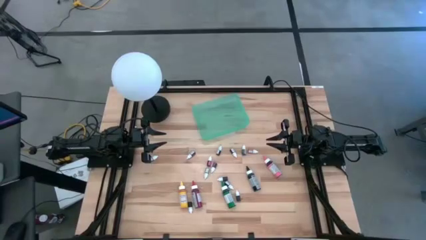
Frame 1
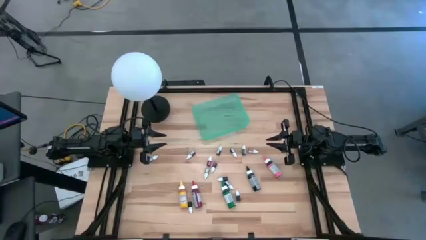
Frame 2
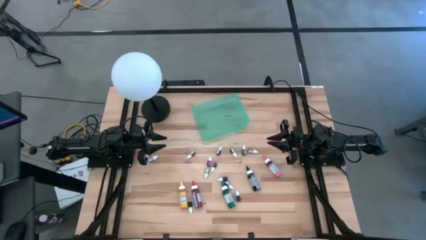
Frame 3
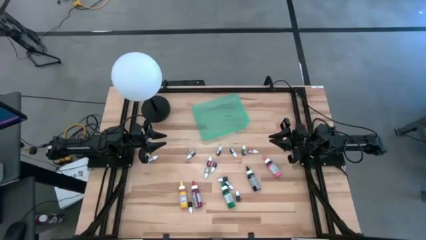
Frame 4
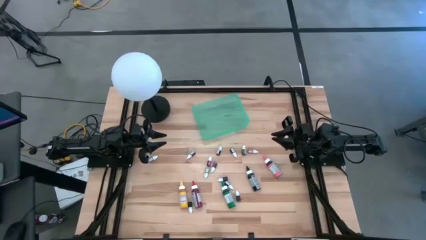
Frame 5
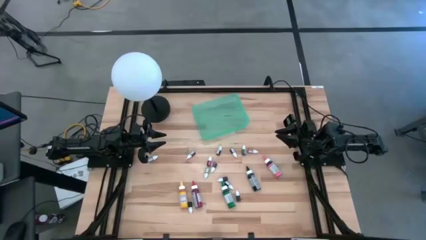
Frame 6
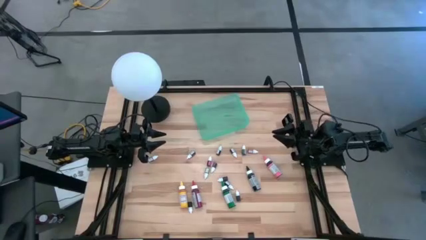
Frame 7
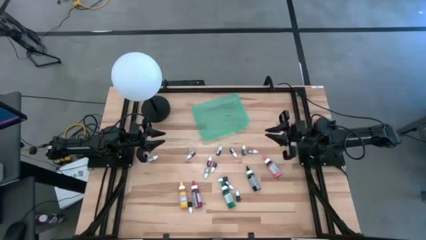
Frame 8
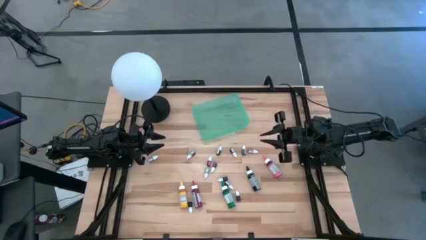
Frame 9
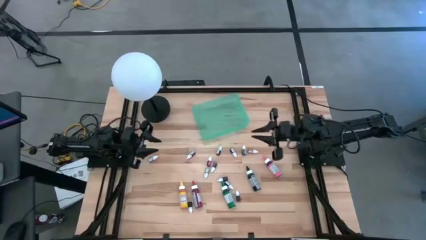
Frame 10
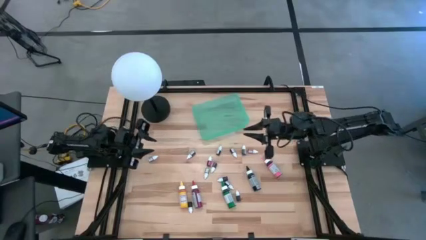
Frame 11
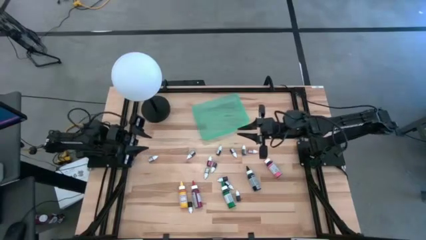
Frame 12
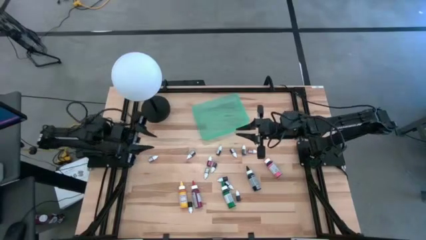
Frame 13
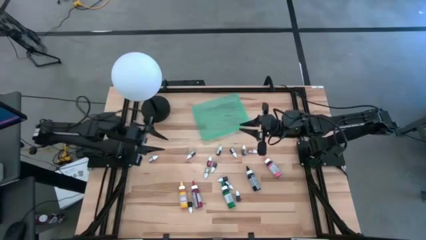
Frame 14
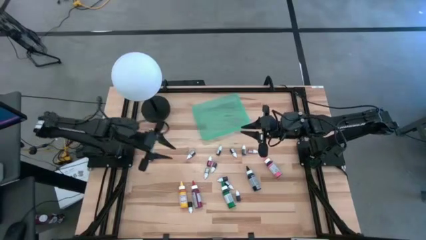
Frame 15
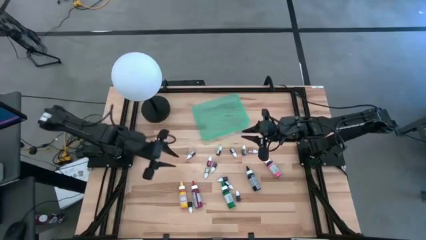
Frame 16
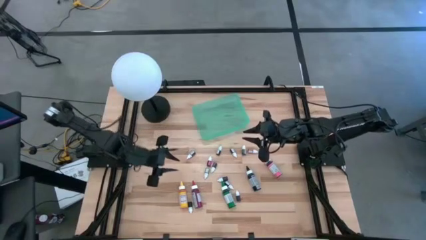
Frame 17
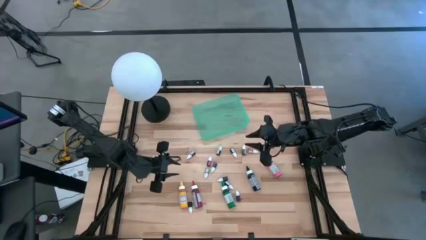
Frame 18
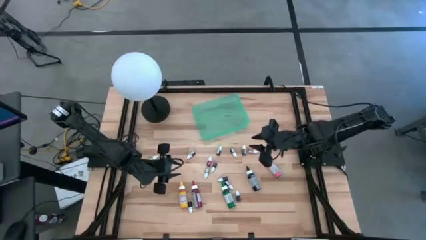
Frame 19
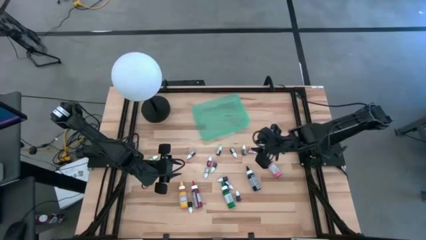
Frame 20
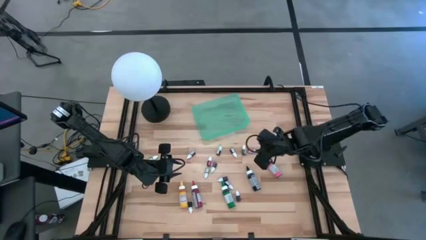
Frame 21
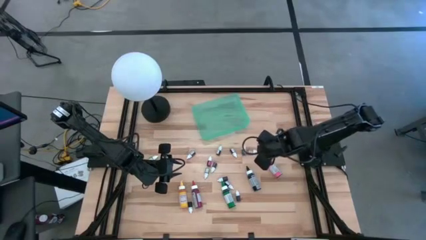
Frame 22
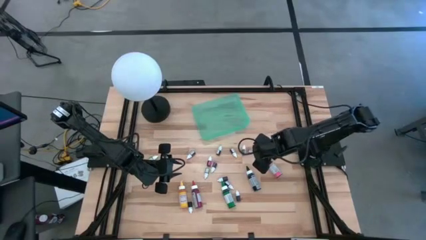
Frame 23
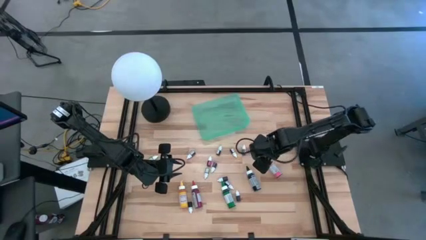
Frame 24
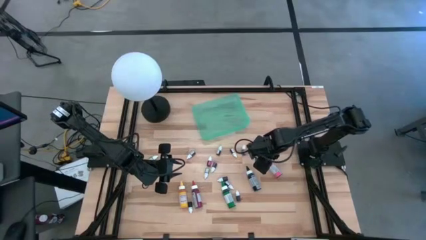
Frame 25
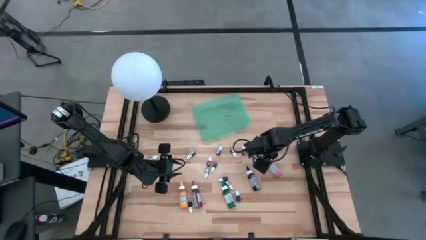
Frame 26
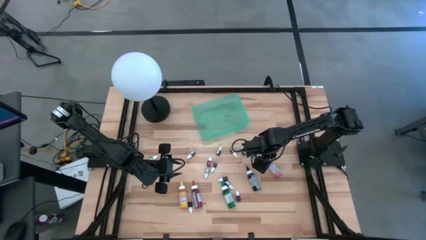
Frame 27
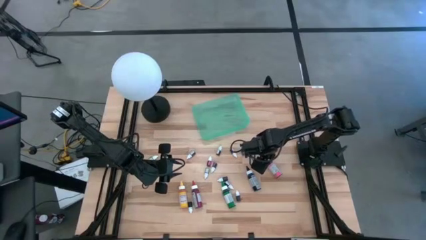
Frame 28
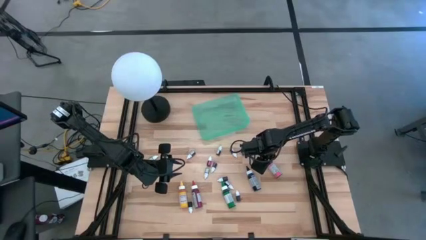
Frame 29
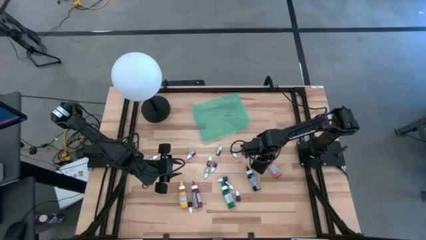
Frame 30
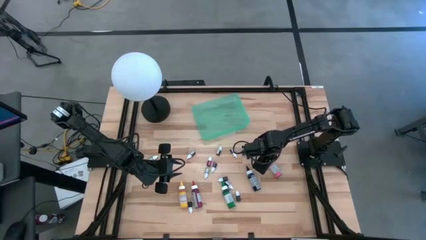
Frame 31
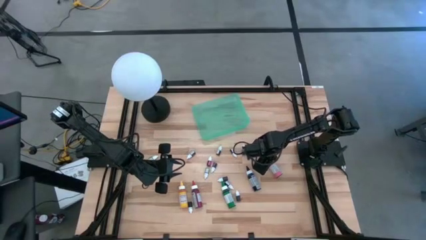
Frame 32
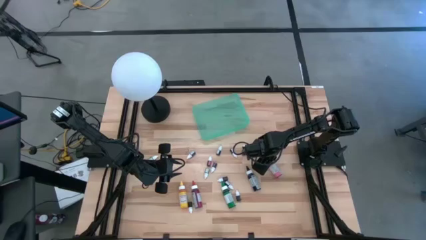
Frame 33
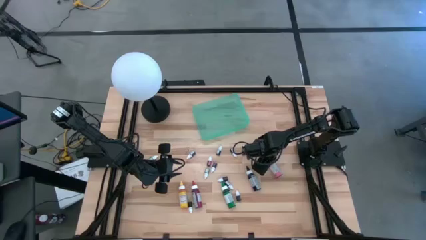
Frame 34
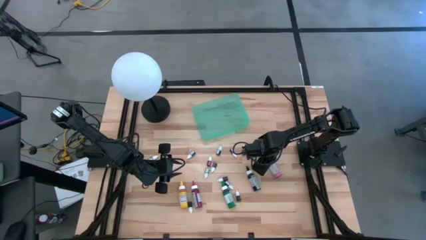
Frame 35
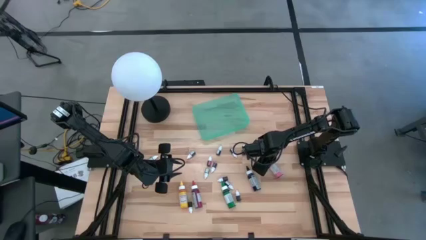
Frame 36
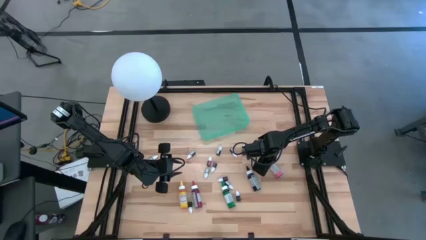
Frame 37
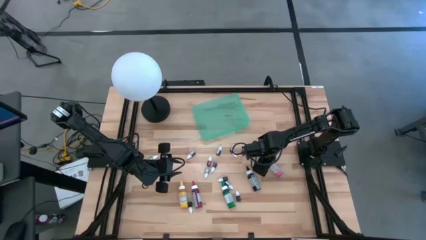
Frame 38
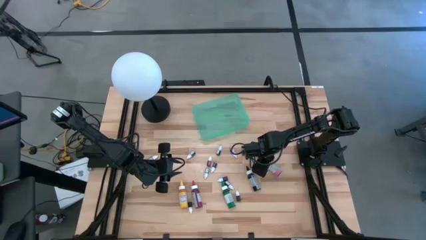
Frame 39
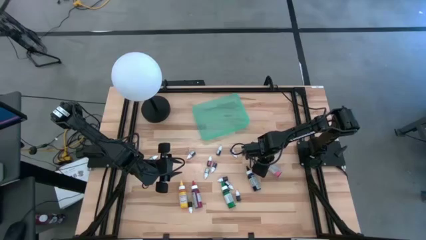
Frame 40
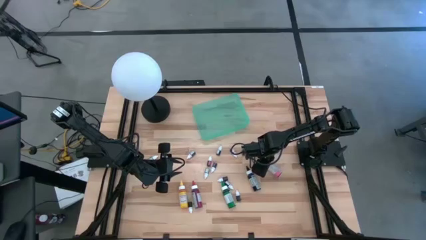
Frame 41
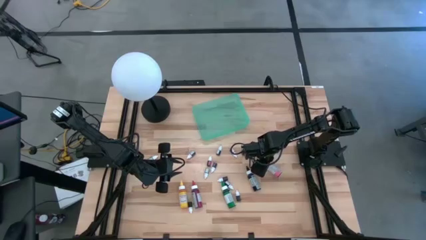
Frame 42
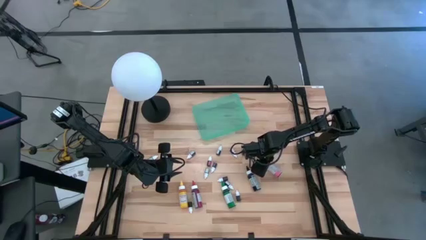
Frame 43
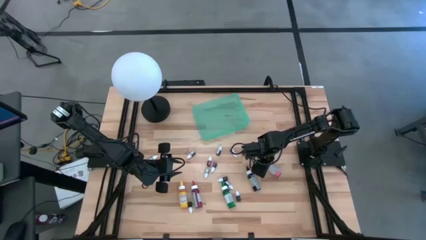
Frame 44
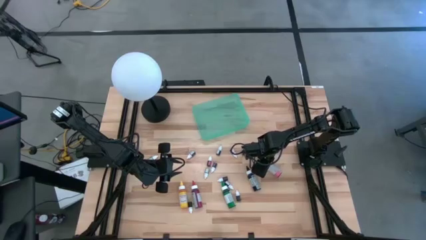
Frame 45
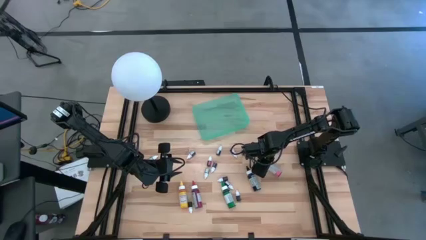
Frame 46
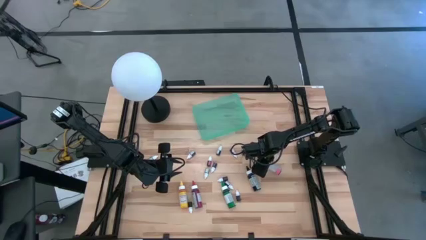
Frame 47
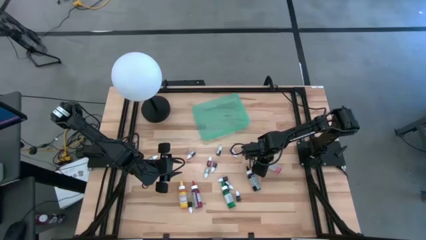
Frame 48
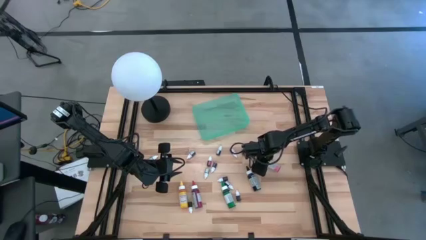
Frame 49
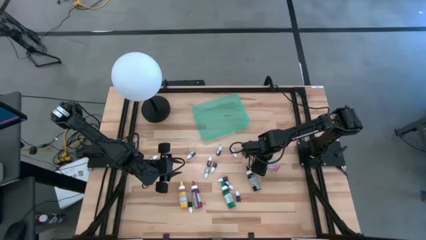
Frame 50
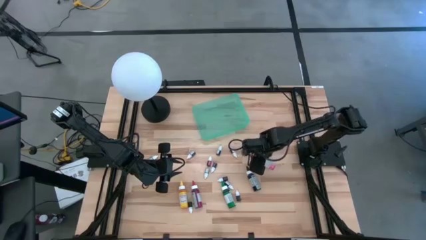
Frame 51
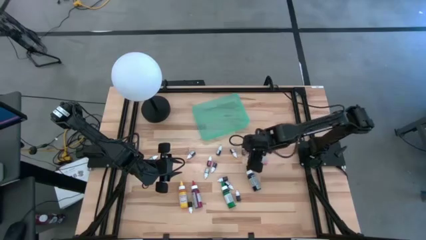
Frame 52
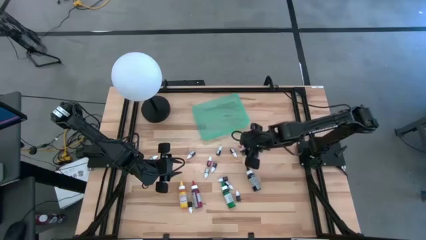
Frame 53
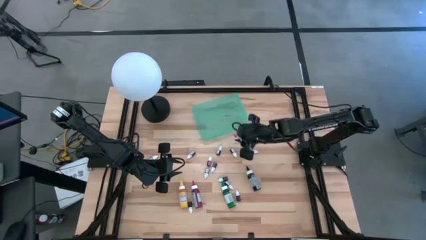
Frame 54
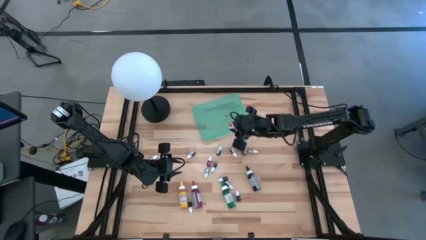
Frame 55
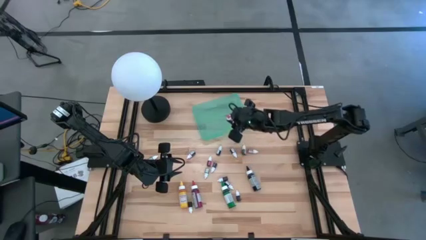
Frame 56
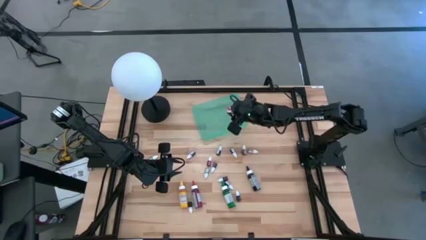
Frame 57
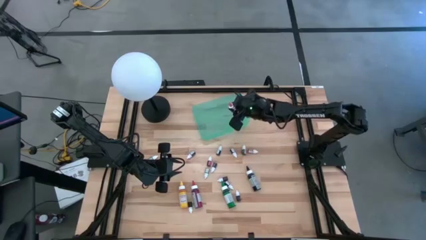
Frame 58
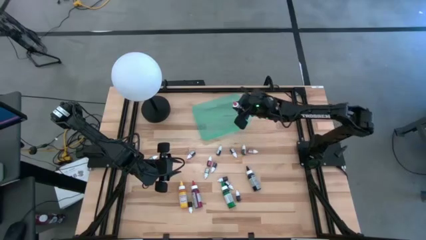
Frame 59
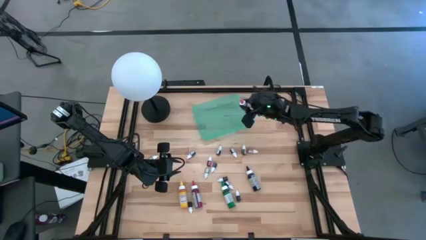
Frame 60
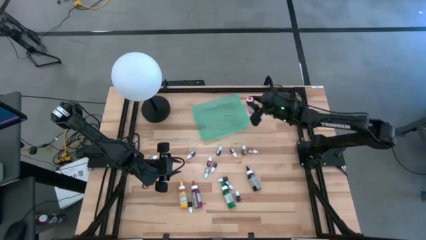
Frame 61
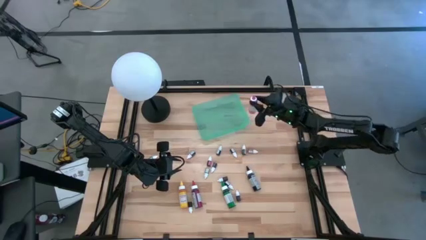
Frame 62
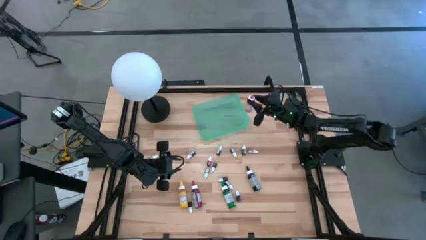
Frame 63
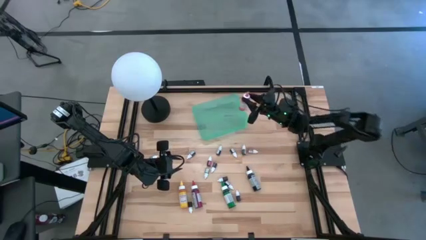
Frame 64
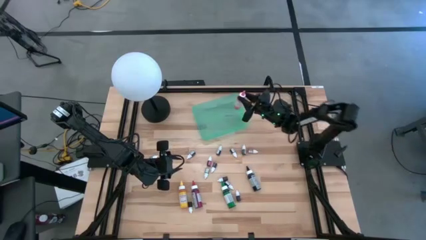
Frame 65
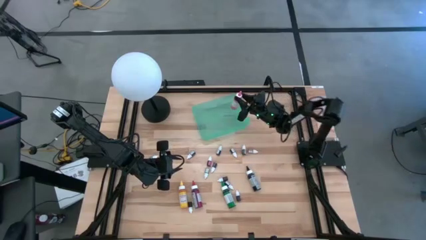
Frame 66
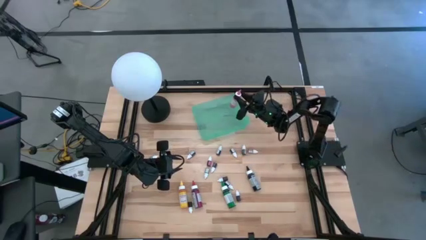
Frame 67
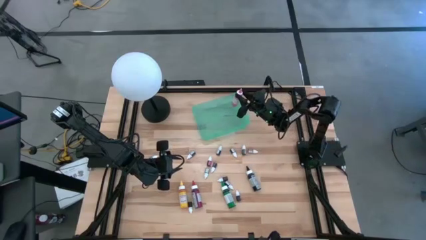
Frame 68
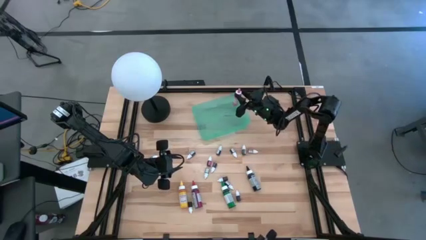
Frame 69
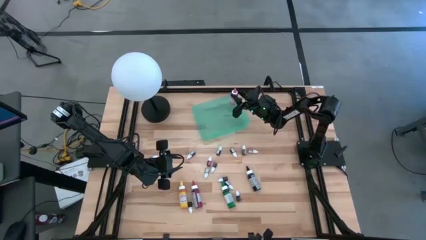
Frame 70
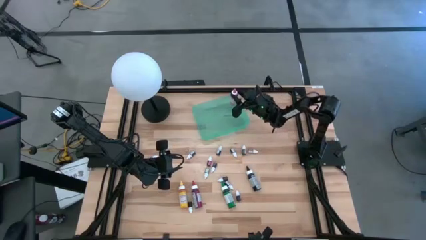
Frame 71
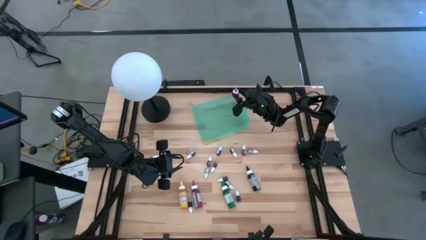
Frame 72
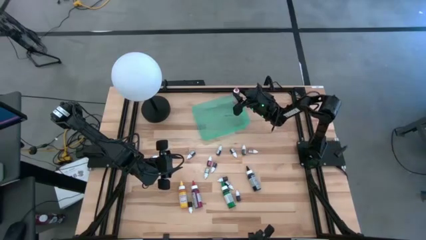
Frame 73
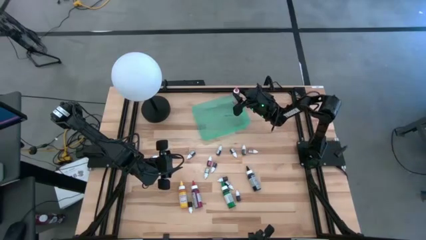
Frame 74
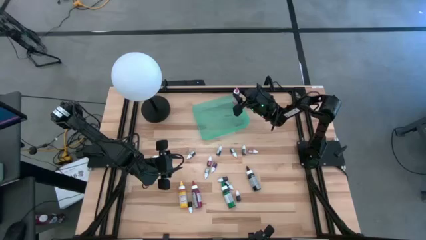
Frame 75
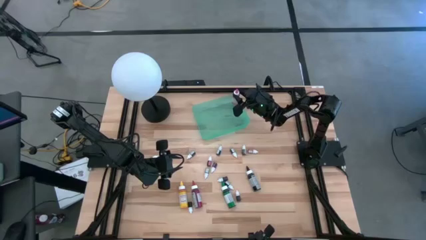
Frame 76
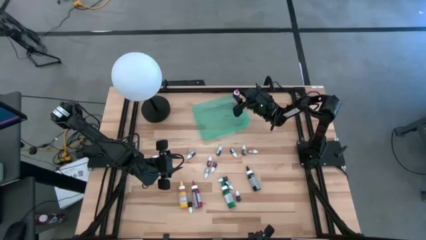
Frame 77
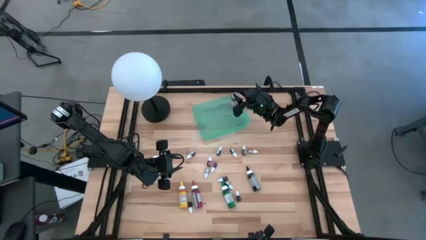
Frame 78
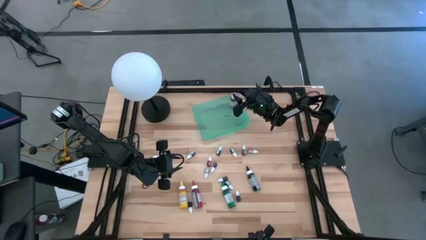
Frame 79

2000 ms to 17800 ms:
Task: Pick & Place food coloring
Put the pink food coloring bottle into the green bin
